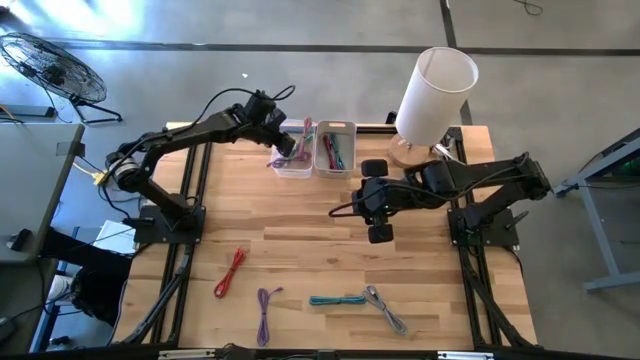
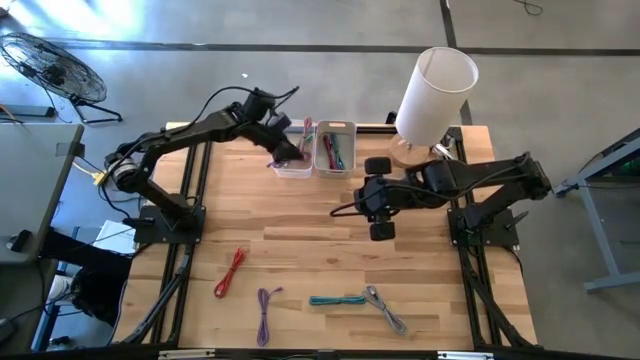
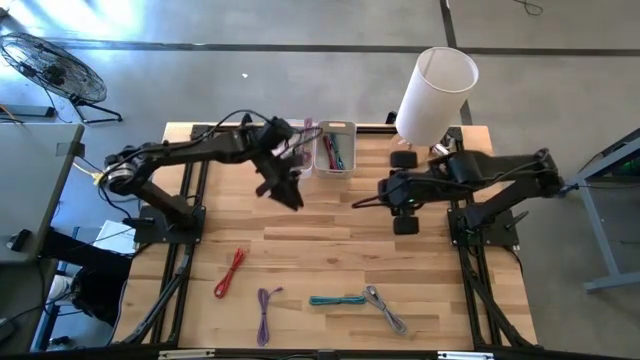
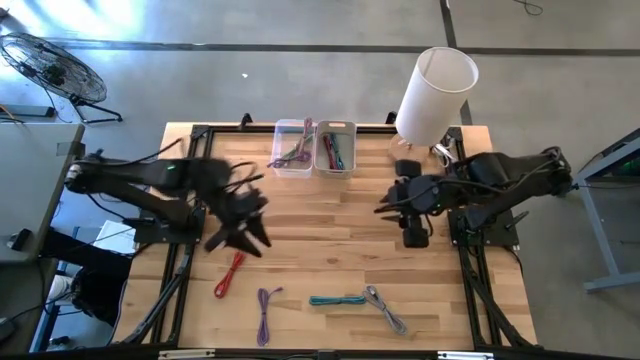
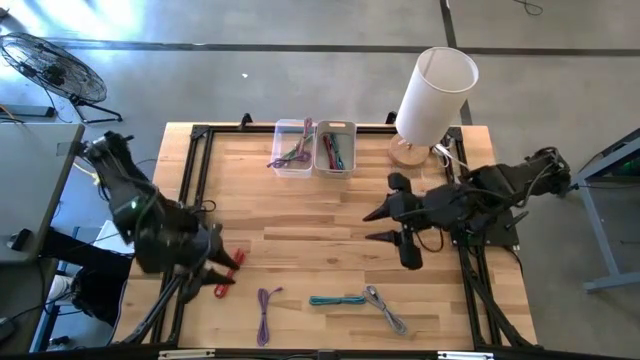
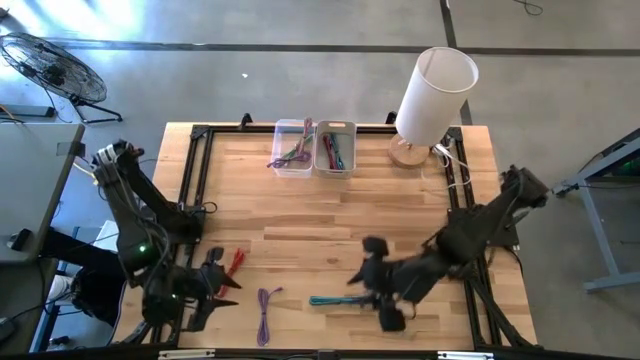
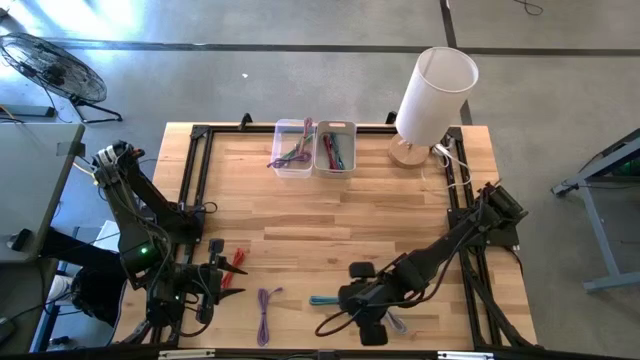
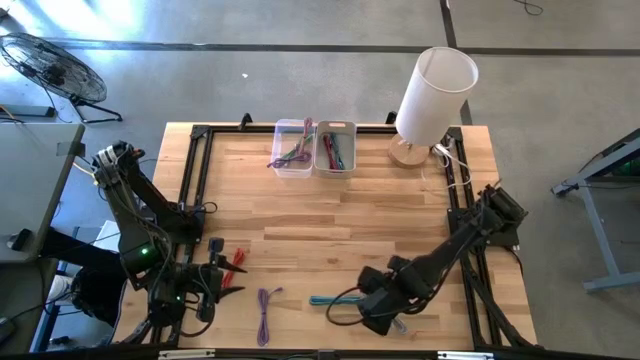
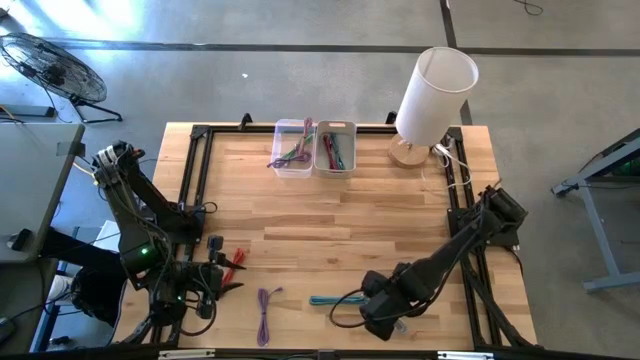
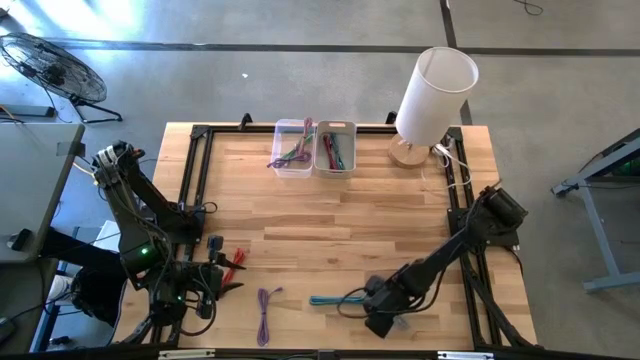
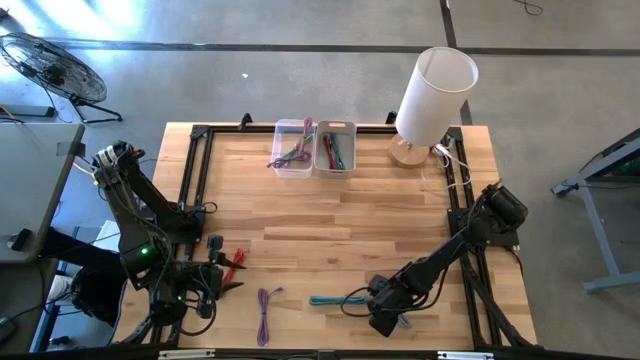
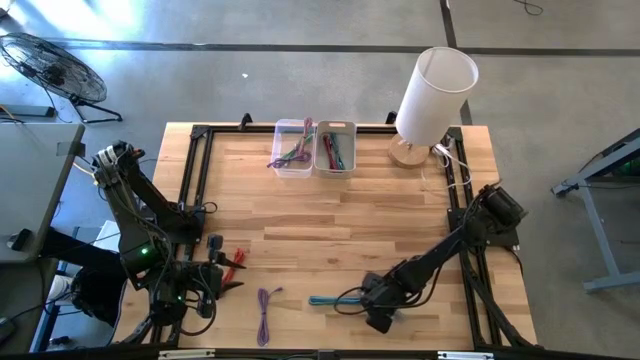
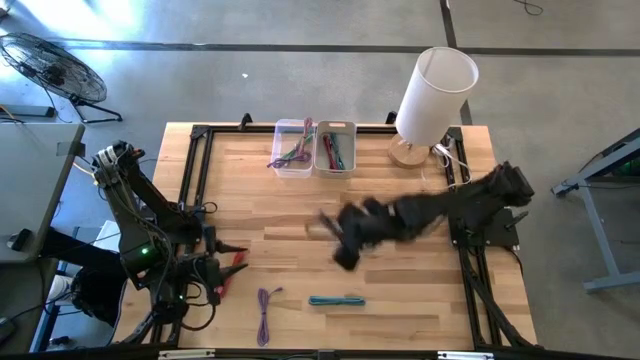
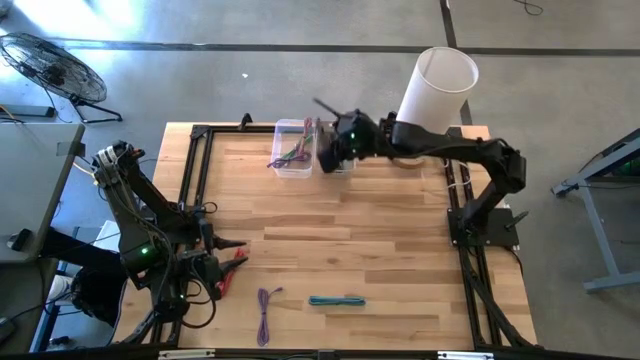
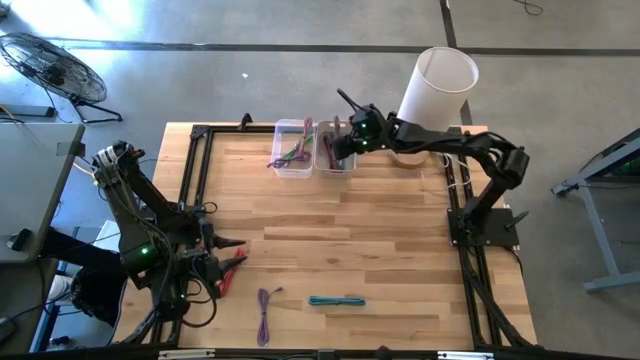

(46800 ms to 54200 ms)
Task: Pick & Place USB Port
Put the white and black charger cable into the gray bin

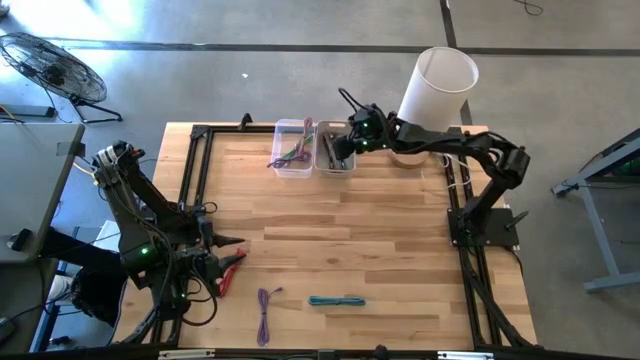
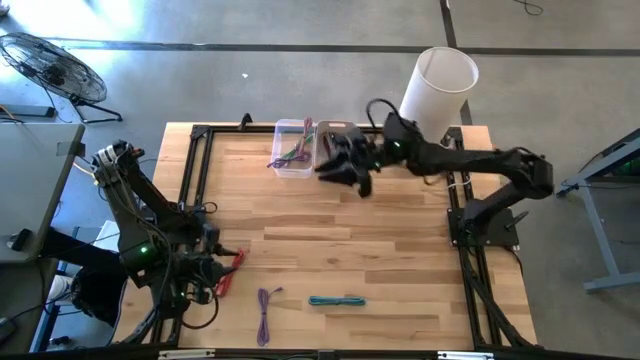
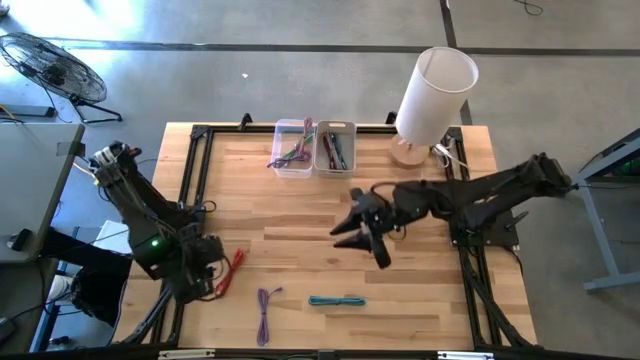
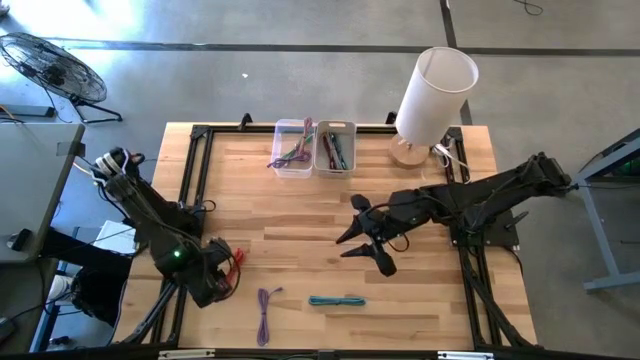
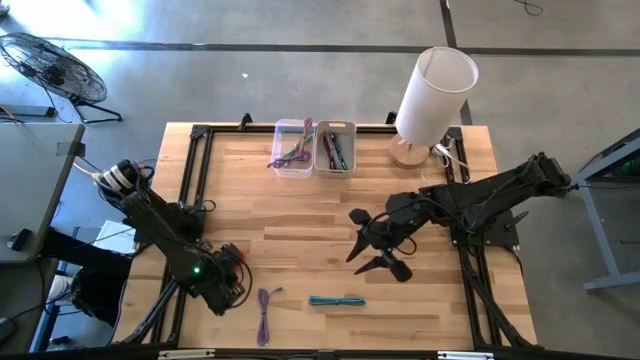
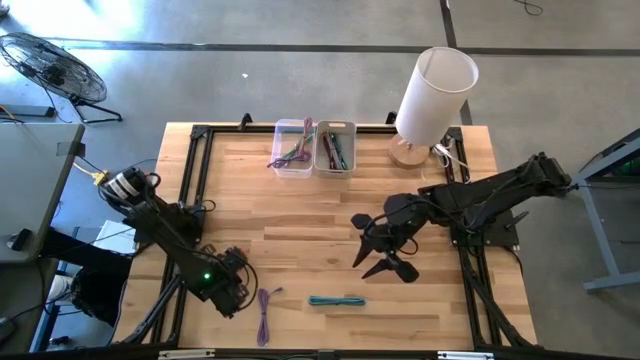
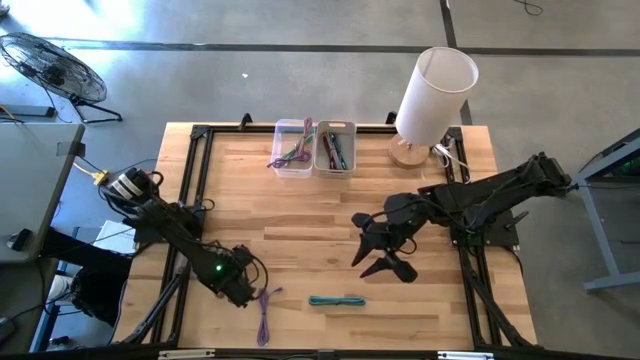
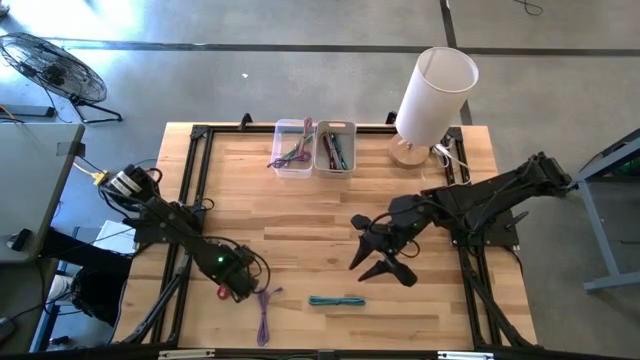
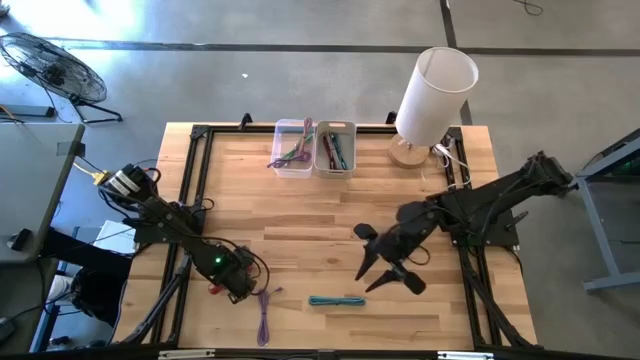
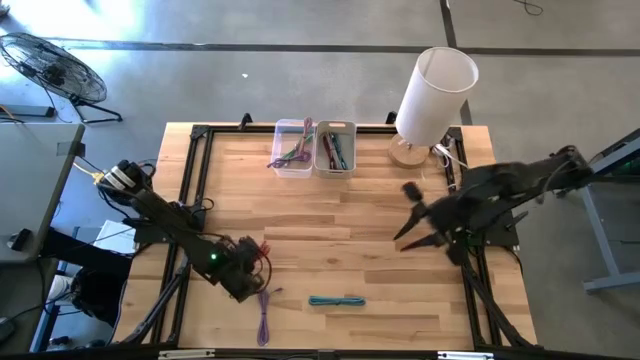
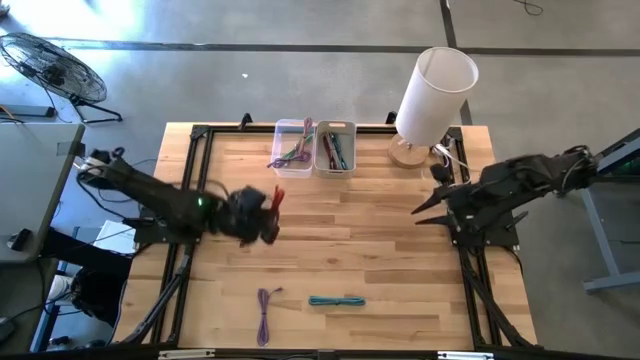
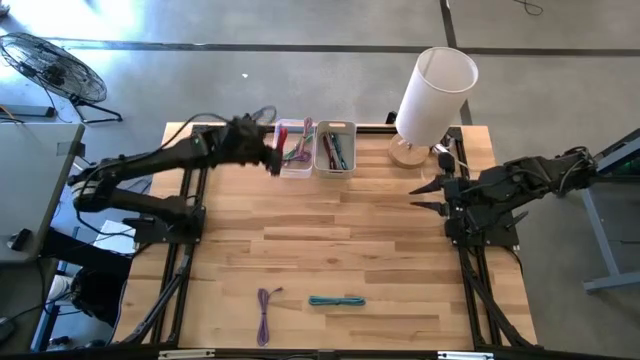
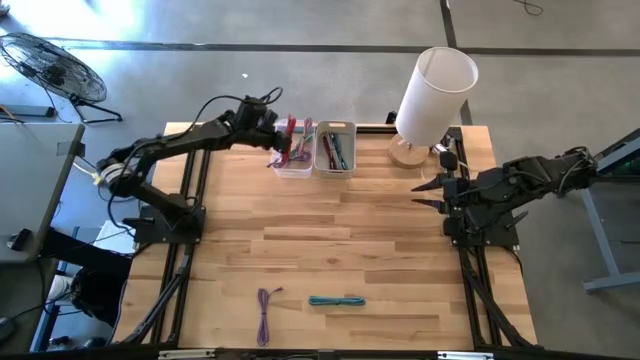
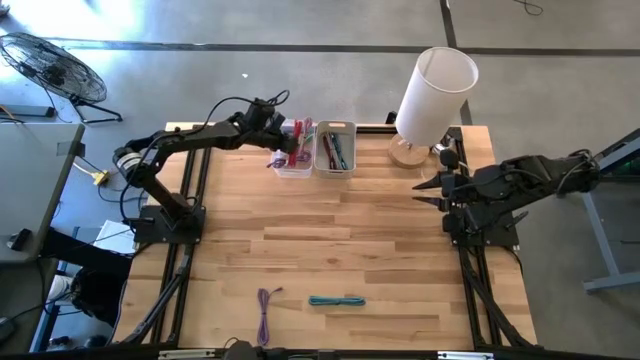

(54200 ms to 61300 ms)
Put the red charger cable into the transparent bin

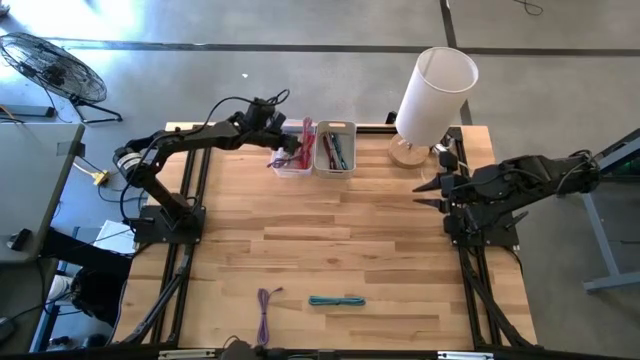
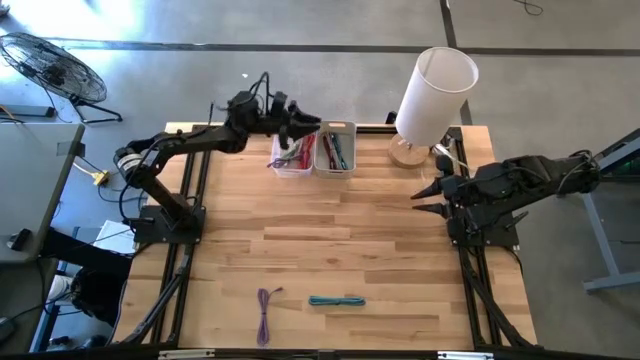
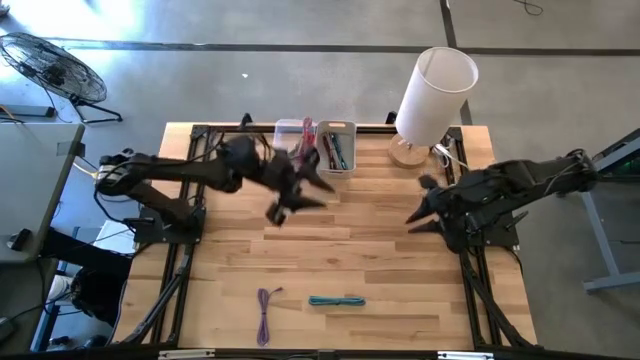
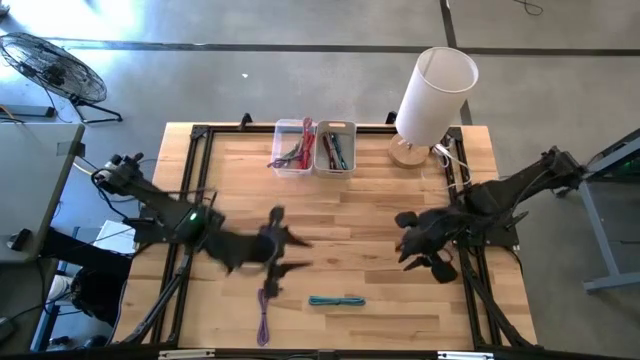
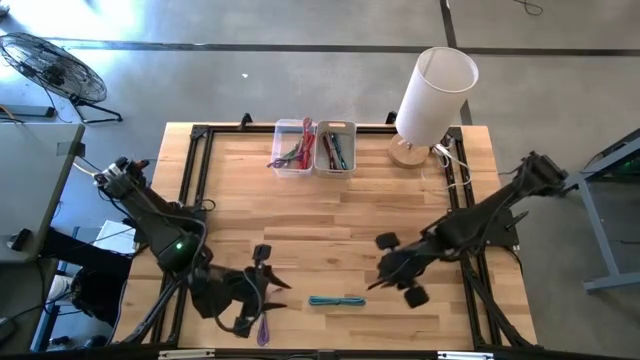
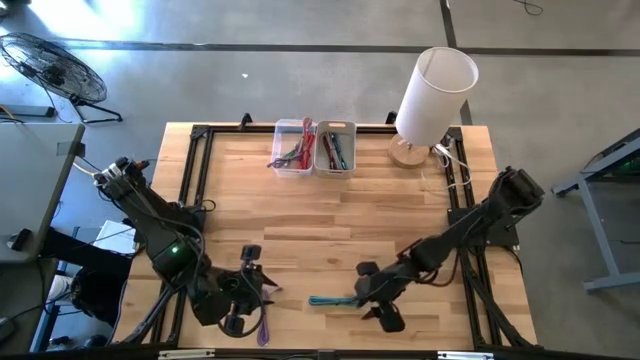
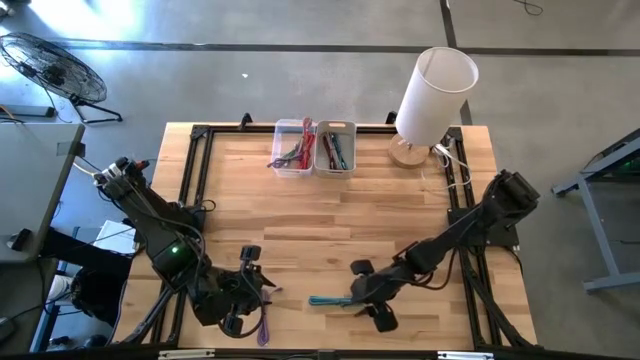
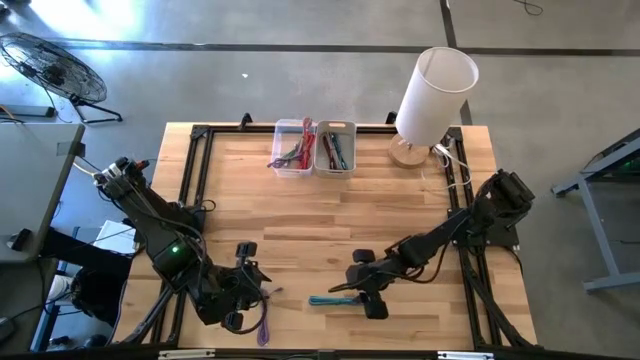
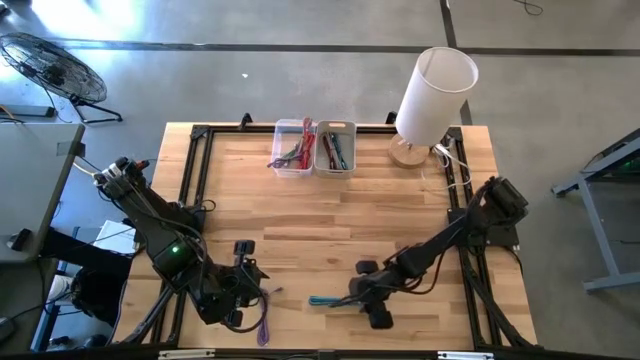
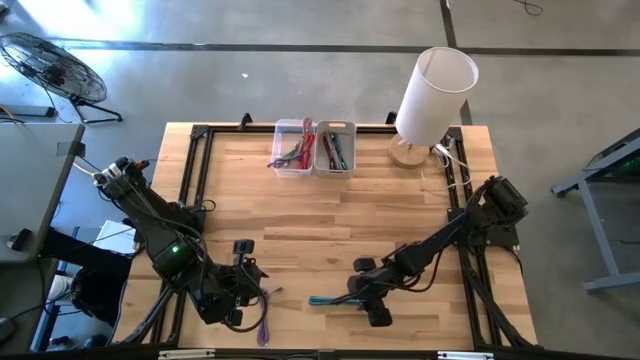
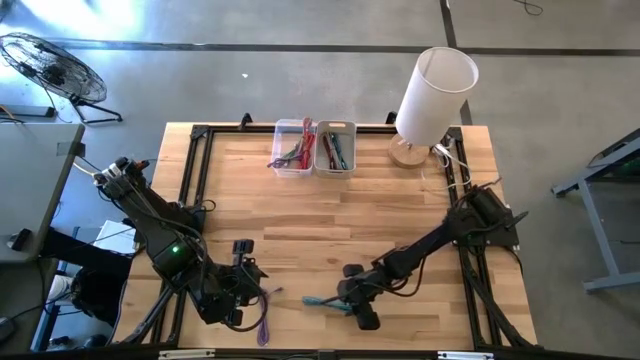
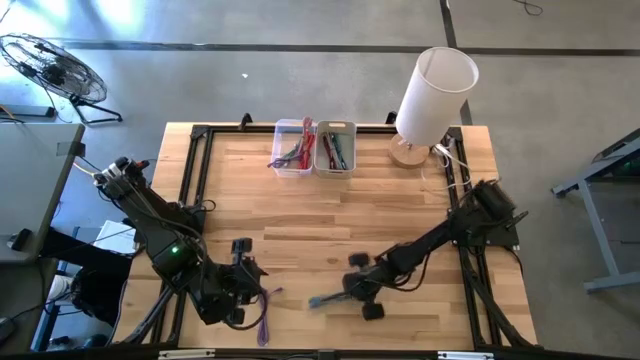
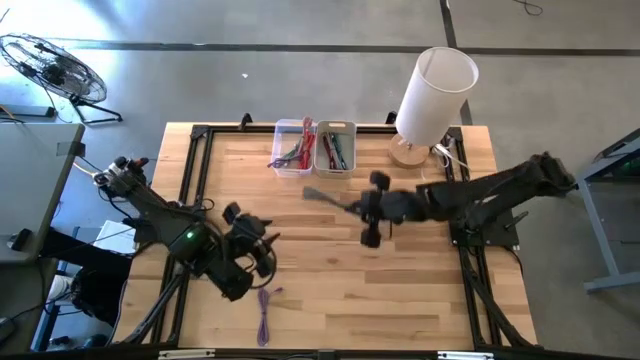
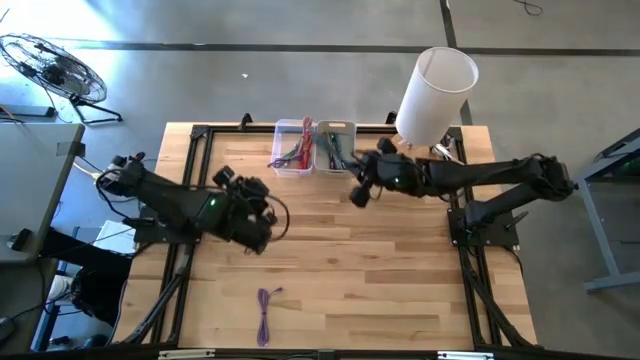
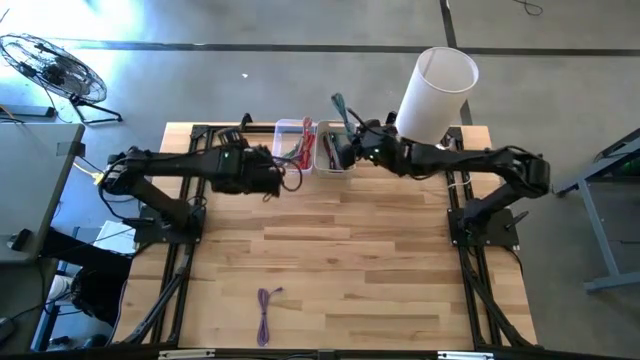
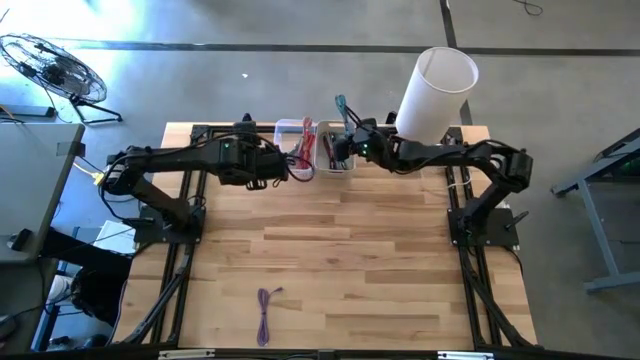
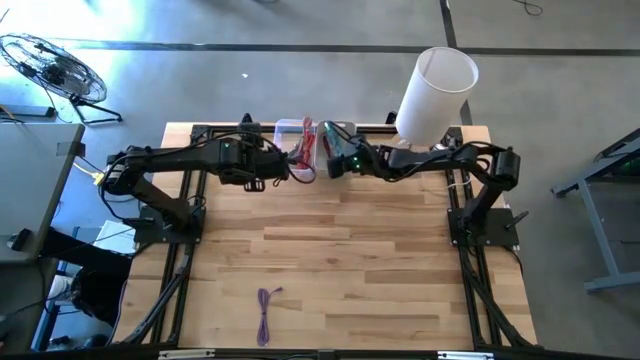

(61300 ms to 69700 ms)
Put the blue and black charger cable into the gray bin
